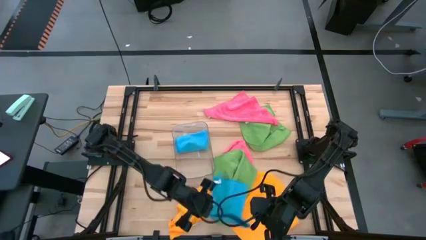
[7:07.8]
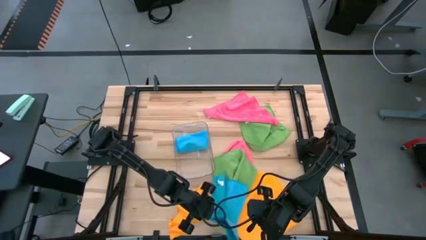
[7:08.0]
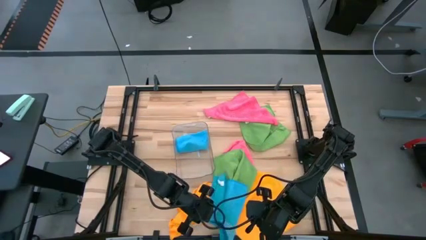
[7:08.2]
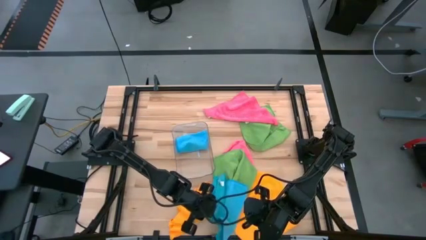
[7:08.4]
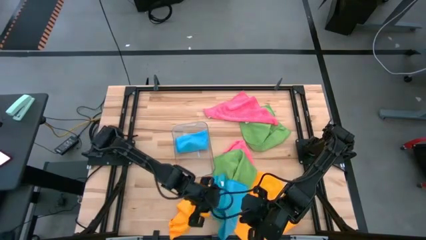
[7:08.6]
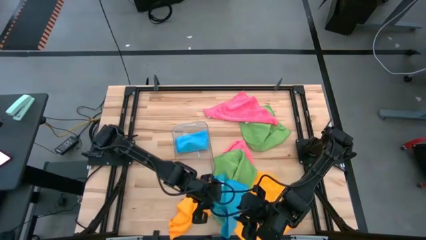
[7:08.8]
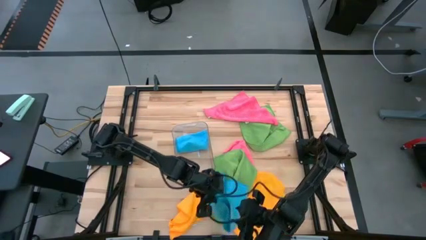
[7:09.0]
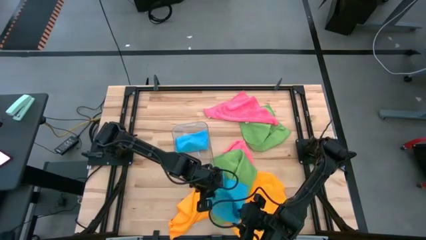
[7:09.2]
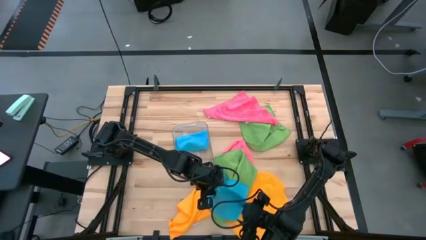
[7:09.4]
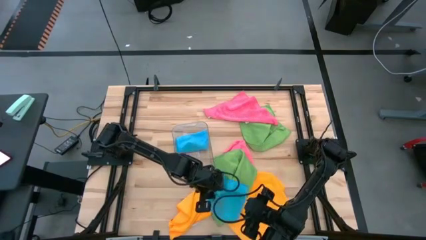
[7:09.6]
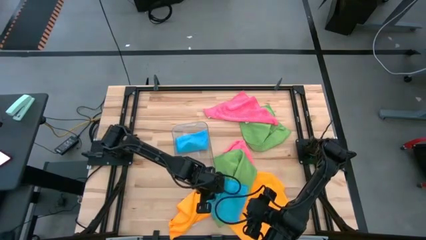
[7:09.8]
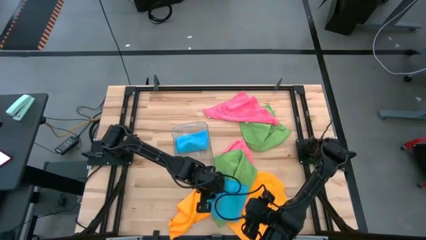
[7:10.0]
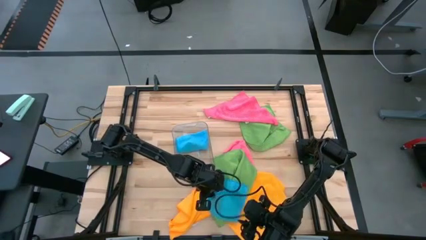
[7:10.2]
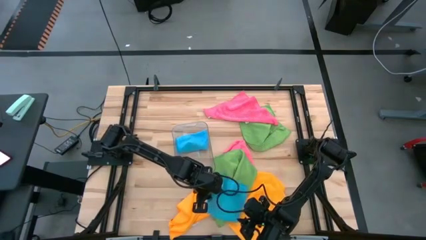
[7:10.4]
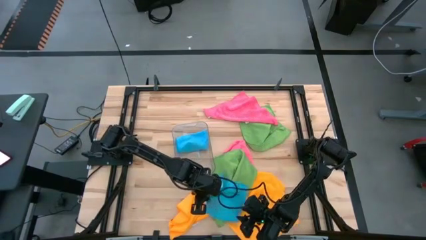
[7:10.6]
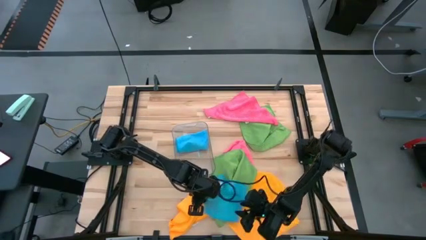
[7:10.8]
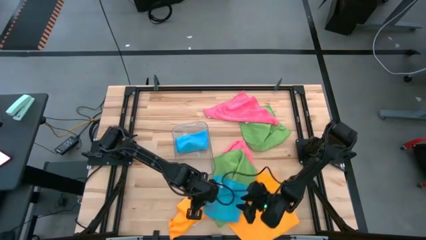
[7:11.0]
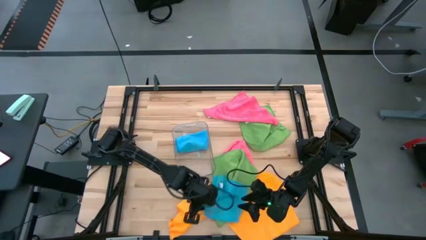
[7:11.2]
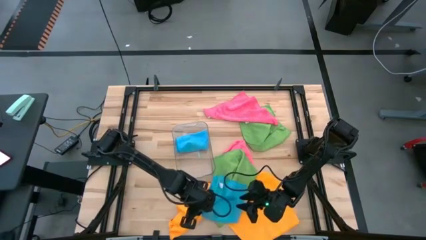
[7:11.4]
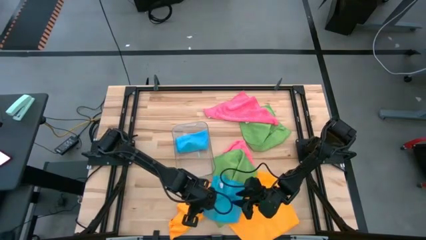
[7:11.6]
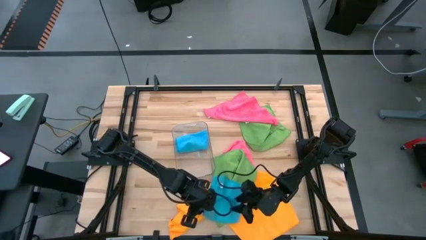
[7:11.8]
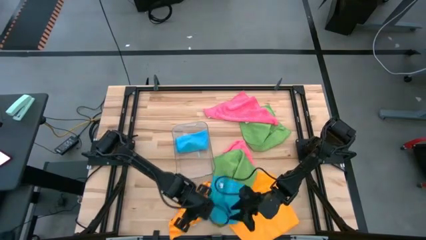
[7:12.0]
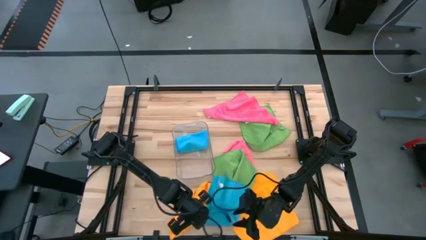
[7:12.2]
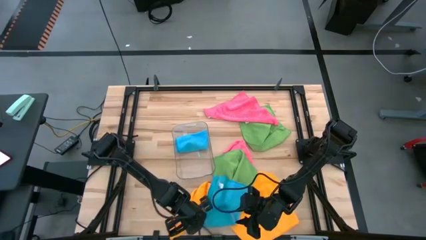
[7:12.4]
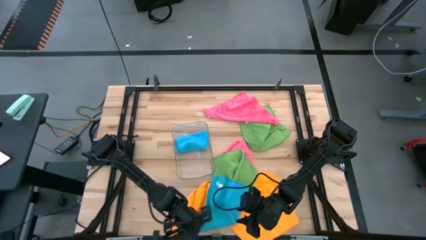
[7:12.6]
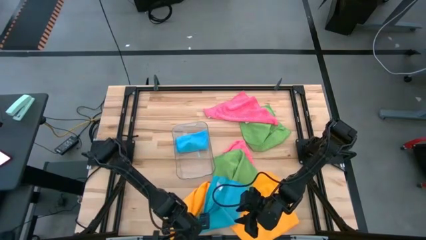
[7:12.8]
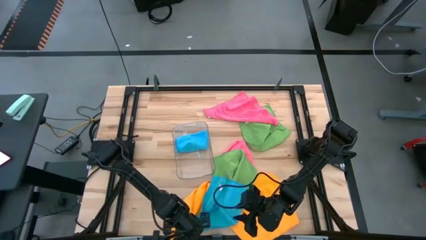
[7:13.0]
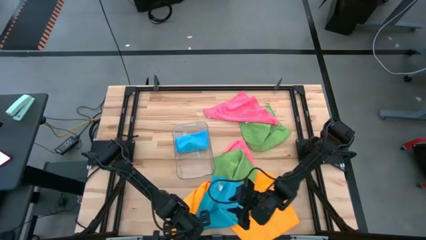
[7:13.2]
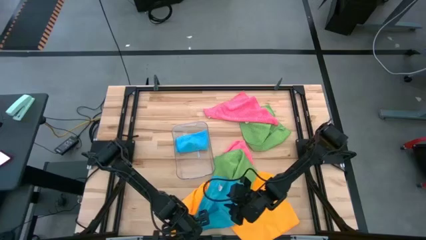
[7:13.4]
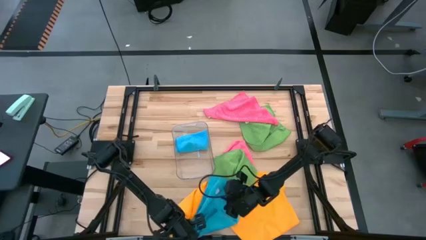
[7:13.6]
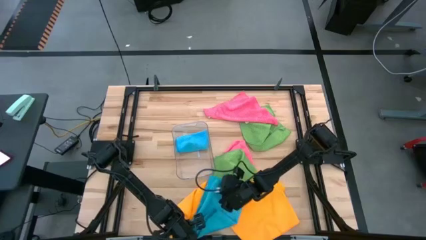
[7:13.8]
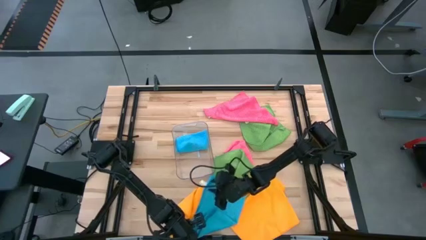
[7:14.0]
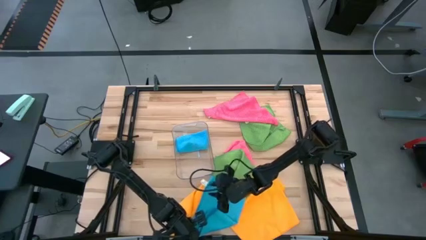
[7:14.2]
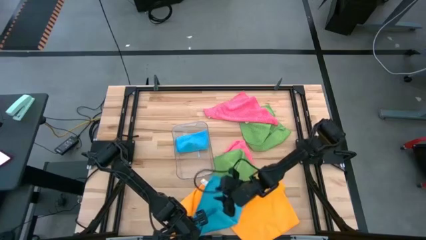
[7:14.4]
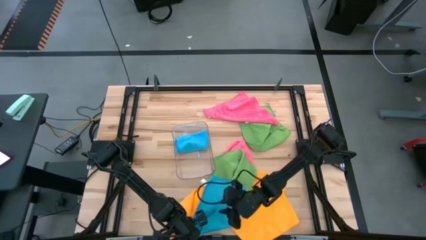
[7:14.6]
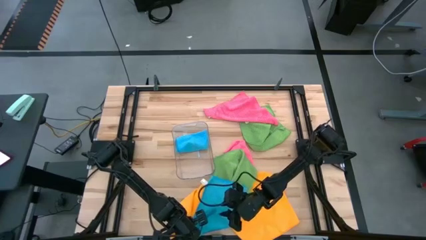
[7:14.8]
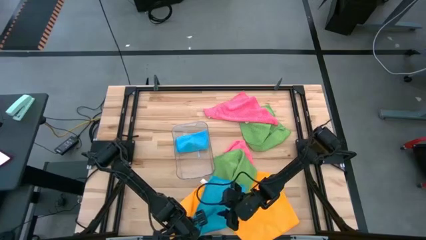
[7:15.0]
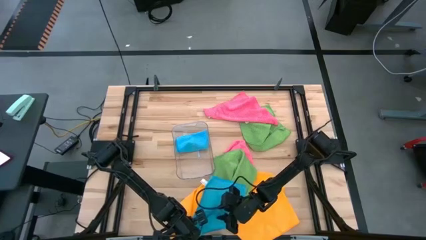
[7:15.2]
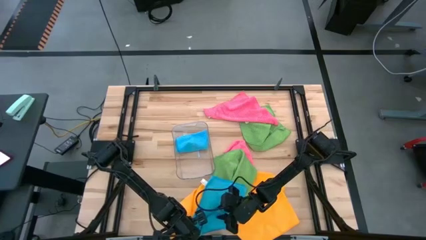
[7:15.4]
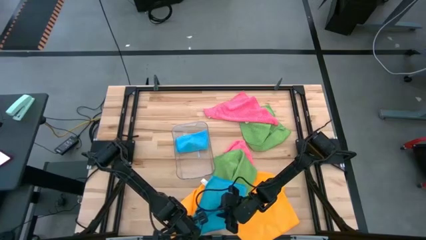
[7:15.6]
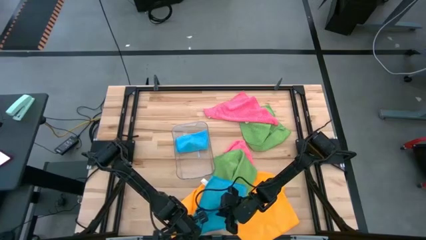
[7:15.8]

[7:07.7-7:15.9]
Task: Fold microfiber towels
Fold the blue towel
